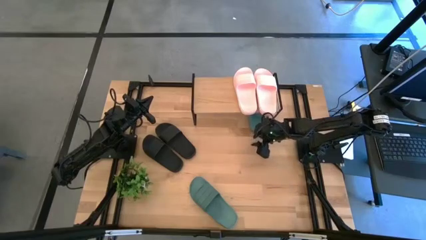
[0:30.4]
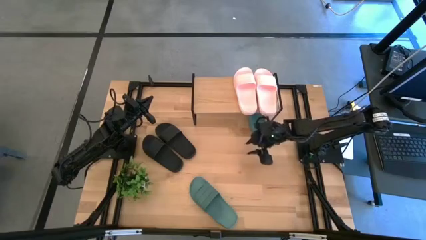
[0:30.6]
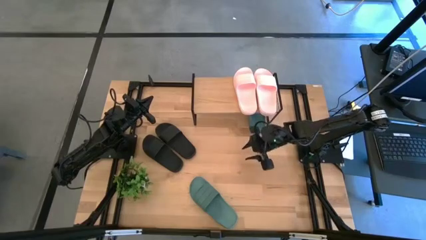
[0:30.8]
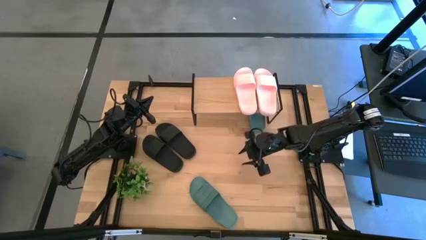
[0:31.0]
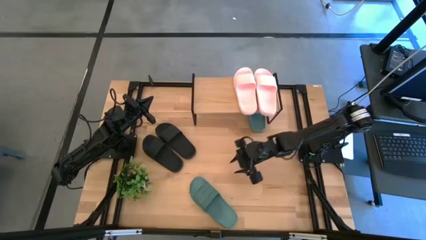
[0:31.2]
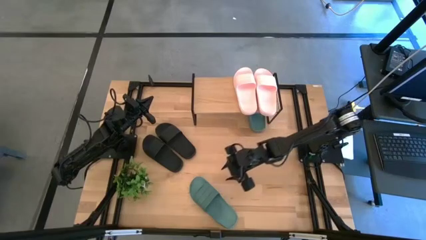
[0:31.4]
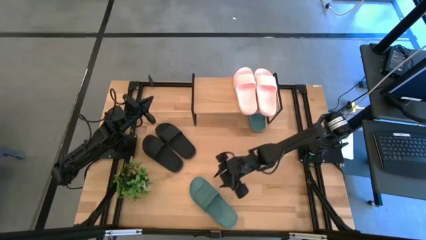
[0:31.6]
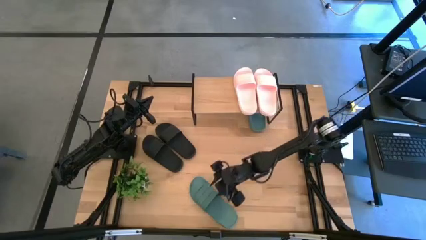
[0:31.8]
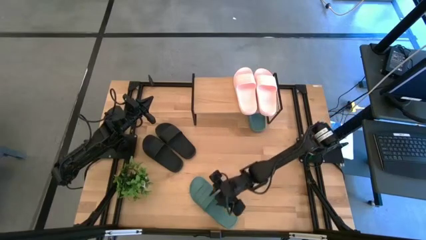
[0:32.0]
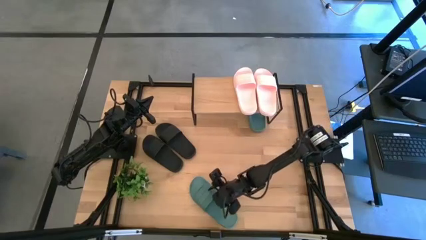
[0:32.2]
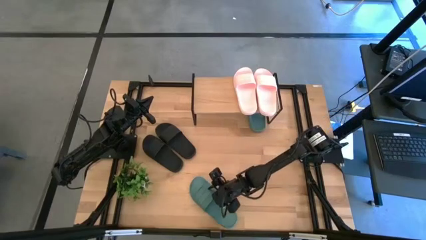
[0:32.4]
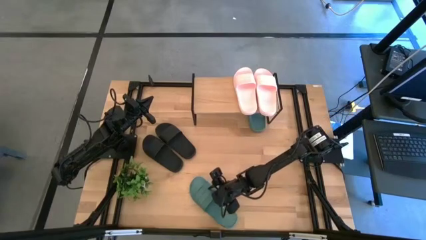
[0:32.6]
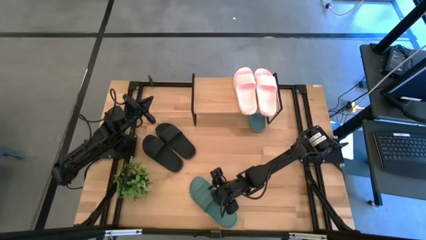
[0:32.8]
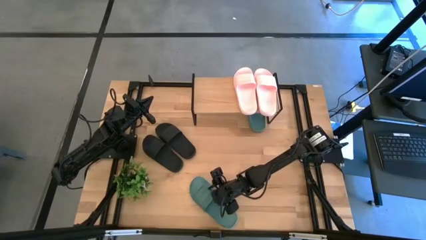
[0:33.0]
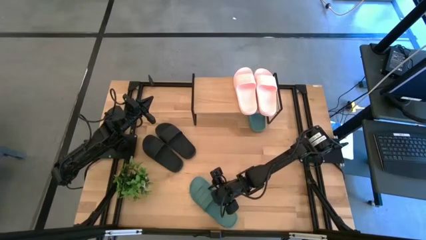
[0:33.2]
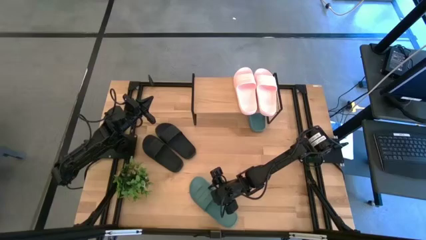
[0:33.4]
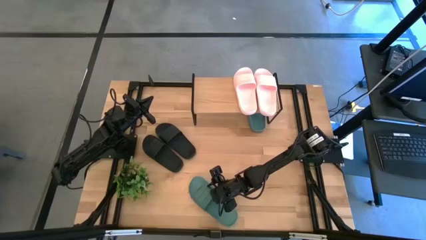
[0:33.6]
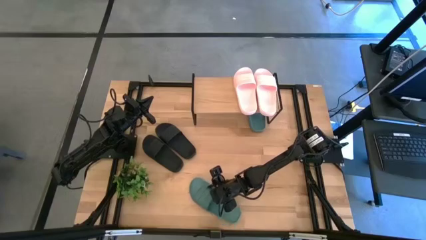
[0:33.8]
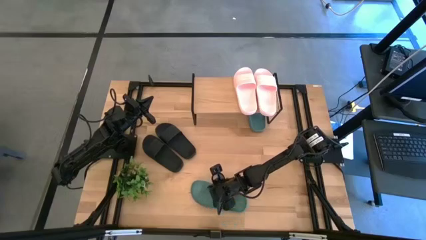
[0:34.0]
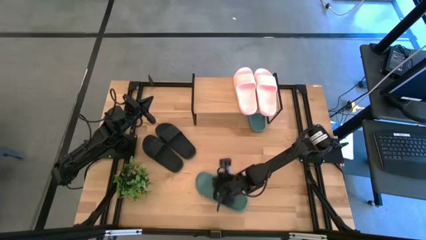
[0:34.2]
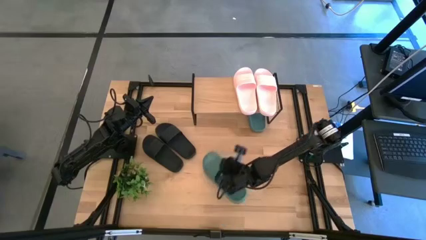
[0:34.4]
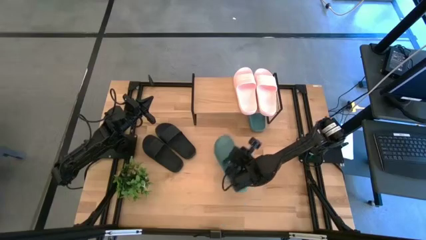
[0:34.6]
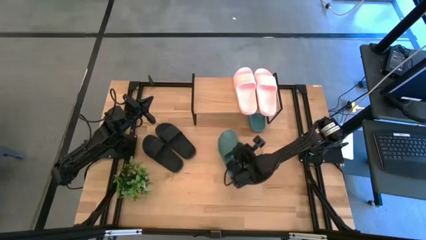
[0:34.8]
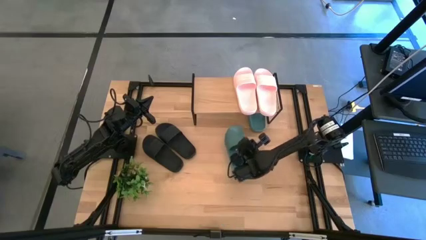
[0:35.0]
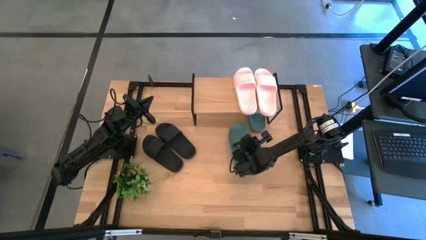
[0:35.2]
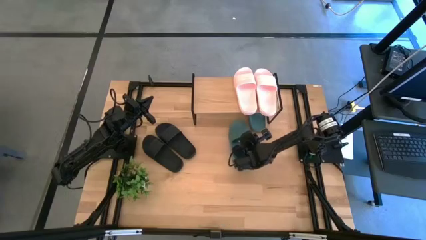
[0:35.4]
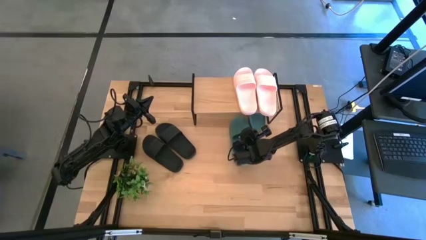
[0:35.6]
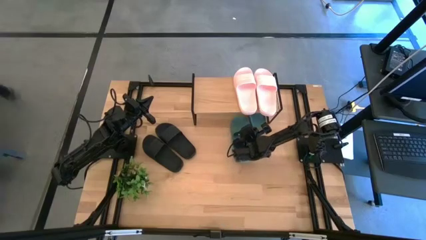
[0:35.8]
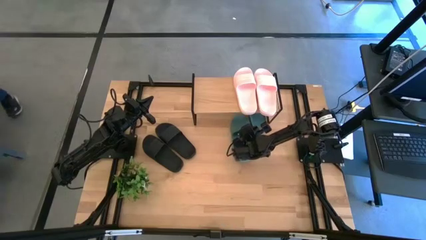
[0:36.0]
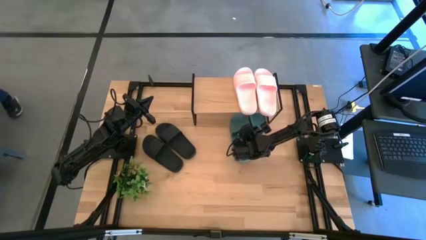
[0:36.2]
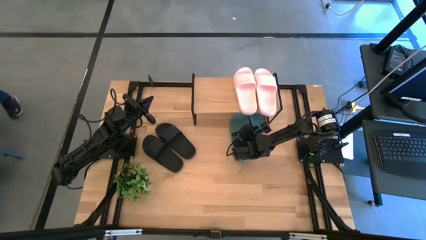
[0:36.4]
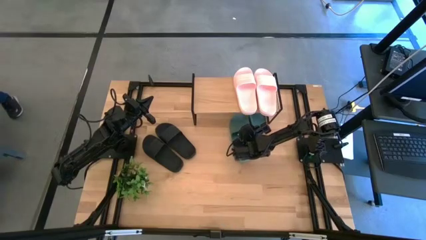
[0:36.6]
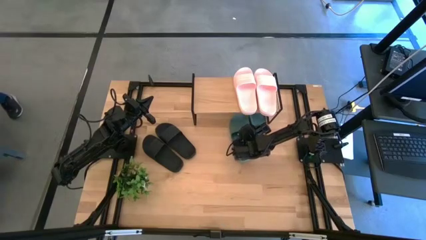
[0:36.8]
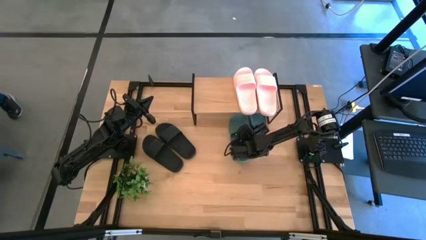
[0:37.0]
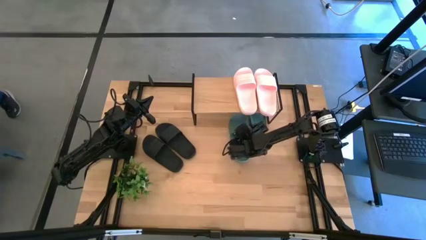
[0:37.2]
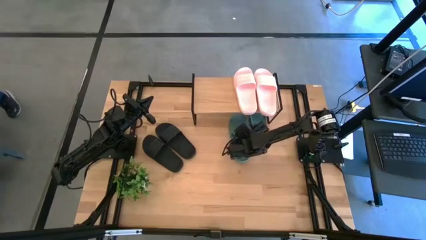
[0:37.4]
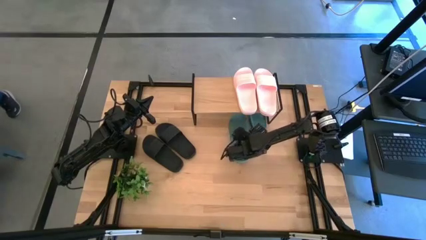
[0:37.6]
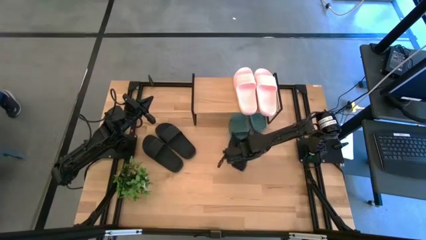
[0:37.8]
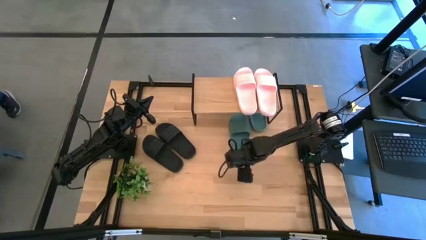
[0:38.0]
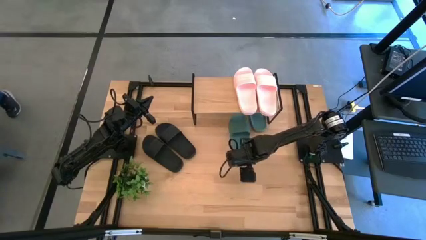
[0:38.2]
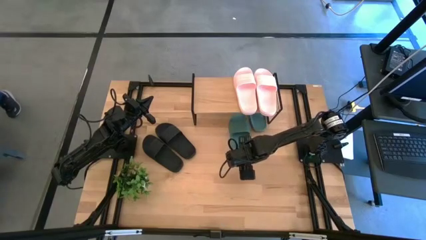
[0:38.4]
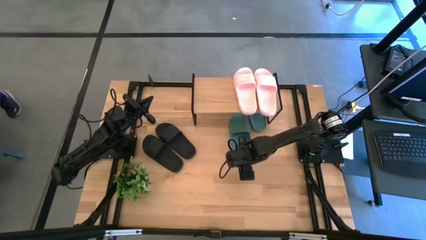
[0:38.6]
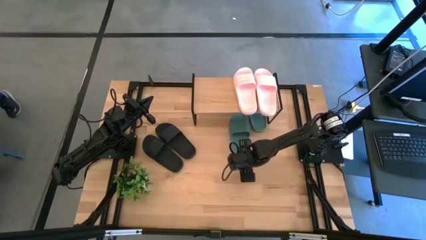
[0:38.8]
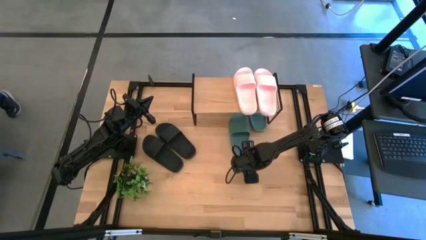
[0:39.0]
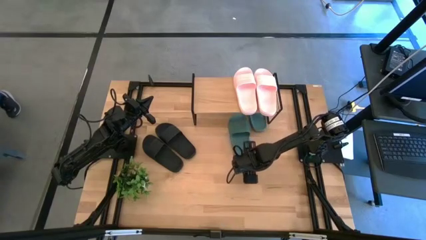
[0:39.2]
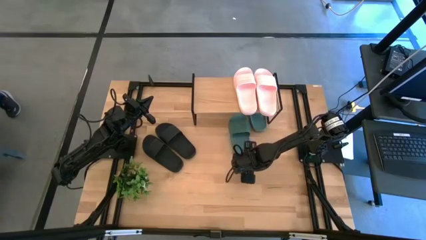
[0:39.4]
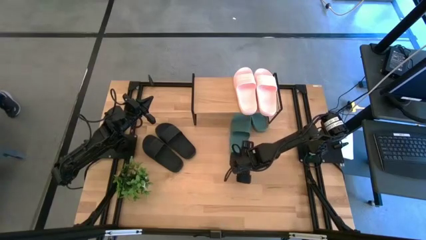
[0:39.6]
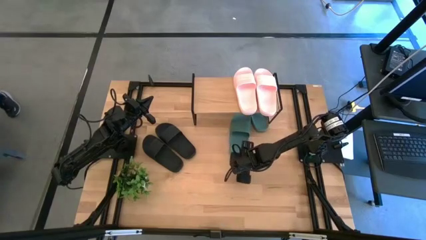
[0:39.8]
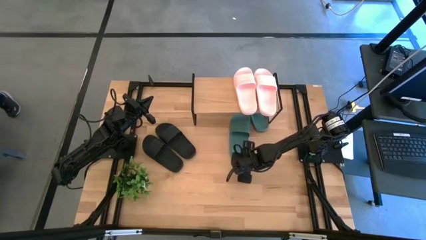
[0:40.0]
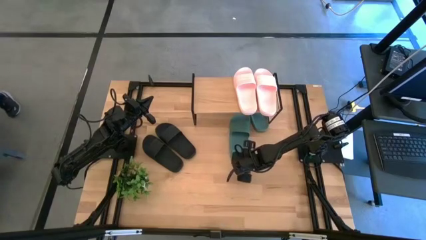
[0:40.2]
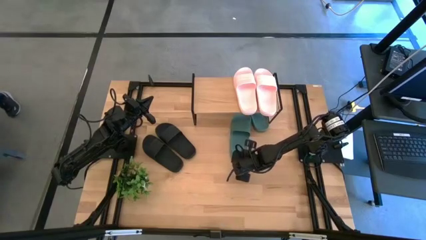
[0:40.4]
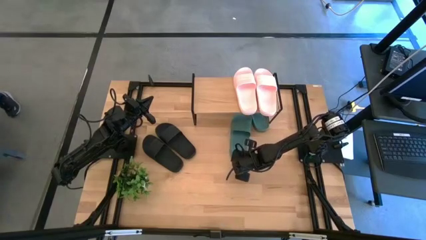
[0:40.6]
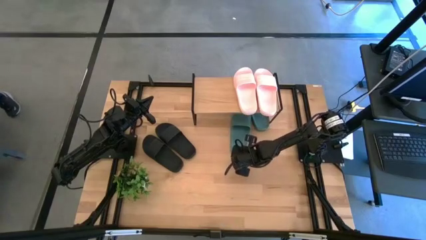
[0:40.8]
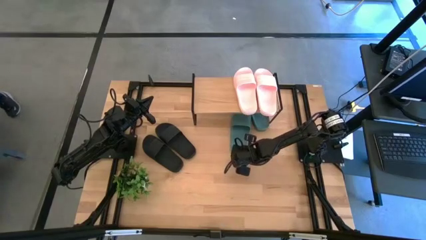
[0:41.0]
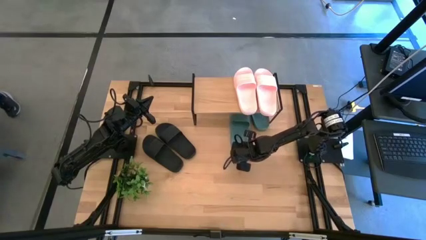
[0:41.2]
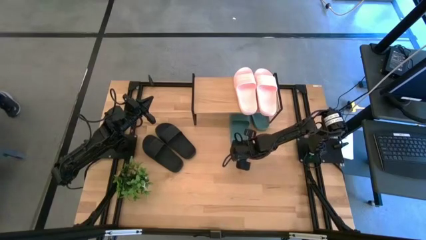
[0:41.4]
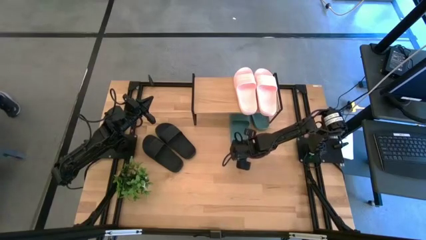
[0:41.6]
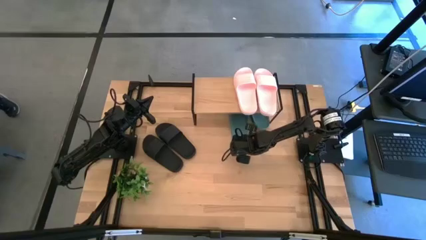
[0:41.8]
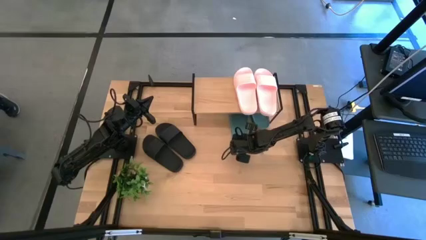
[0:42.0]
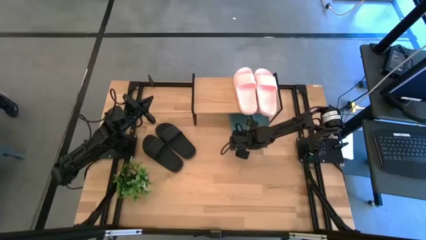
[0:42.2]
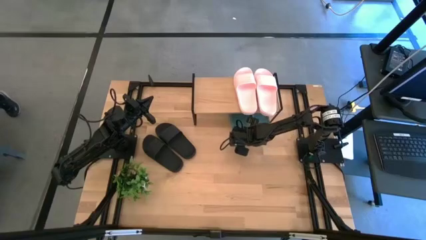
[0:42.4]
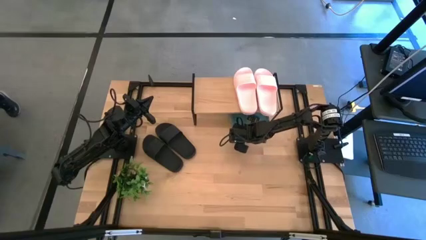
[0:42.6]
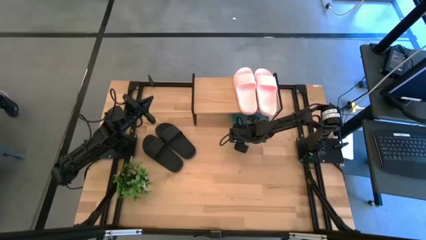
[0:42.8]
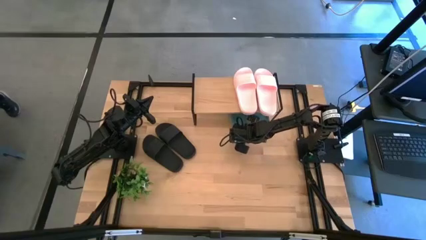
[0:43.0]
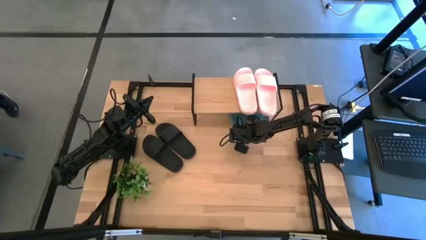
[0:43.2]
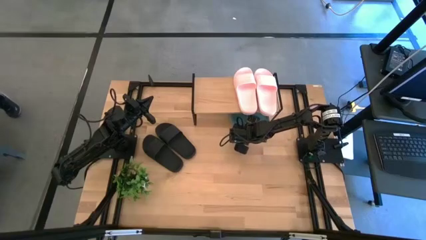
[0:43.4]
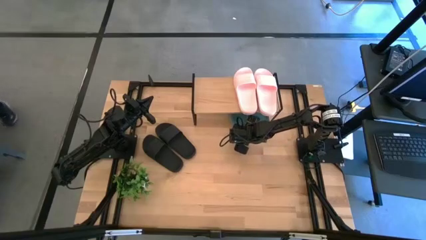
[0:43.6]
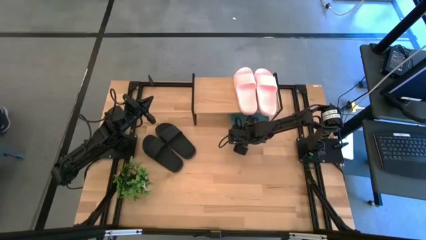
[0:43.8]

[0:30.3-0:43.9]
Task: Pick and place slides into the shelf
Put the green slide under the shelf

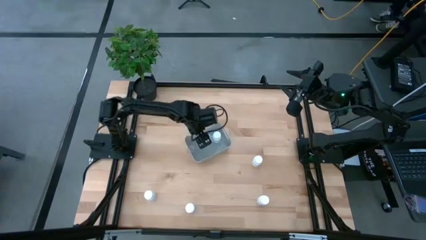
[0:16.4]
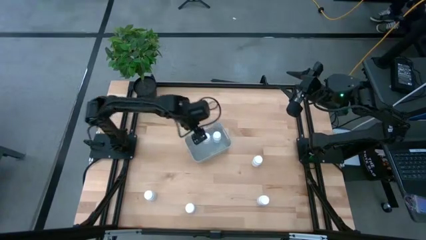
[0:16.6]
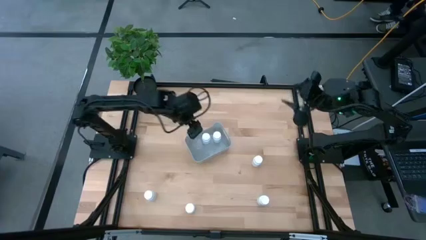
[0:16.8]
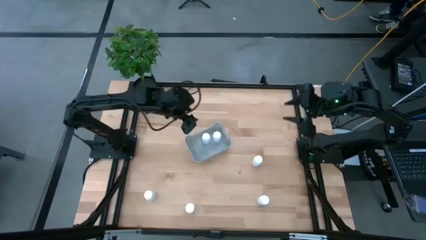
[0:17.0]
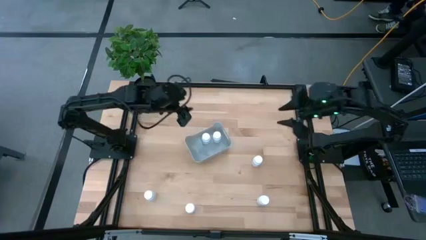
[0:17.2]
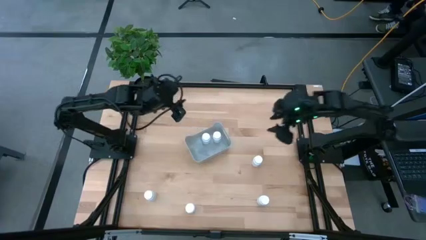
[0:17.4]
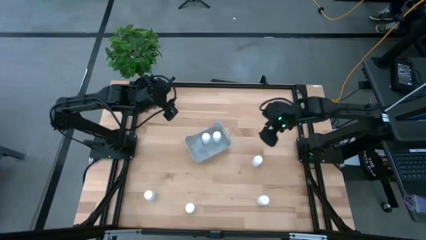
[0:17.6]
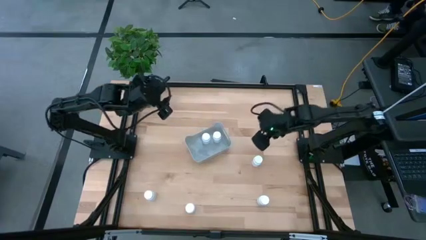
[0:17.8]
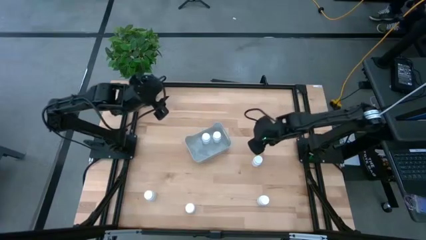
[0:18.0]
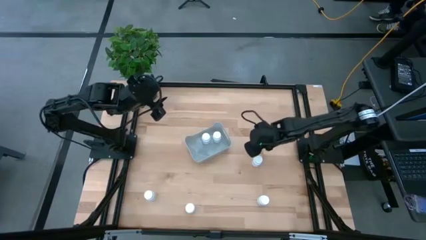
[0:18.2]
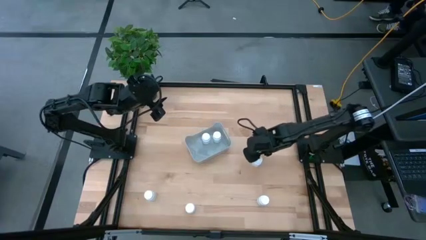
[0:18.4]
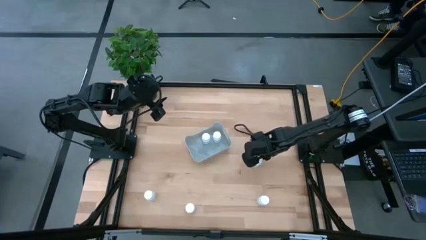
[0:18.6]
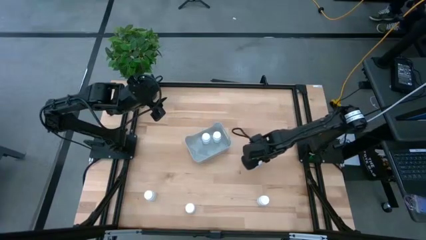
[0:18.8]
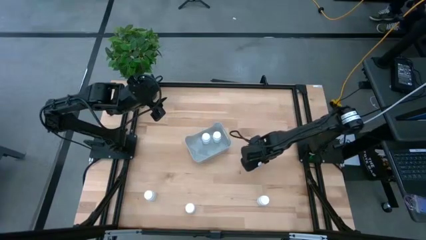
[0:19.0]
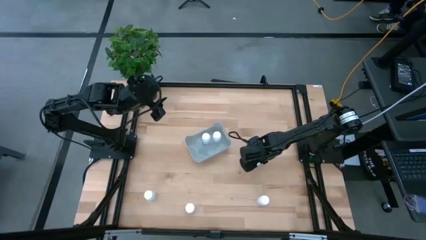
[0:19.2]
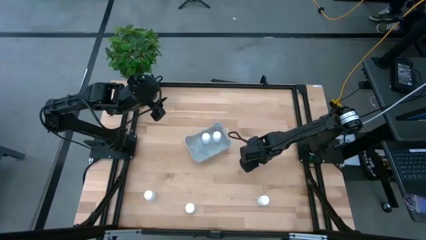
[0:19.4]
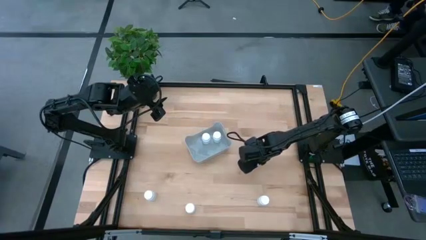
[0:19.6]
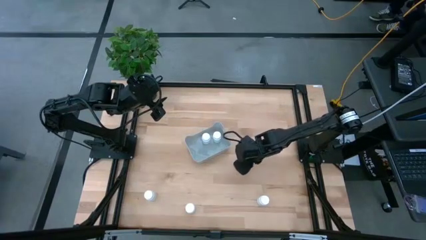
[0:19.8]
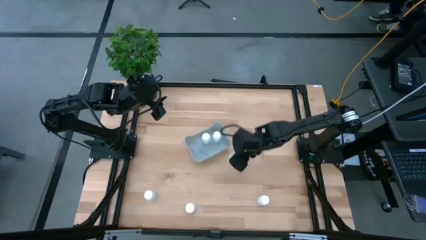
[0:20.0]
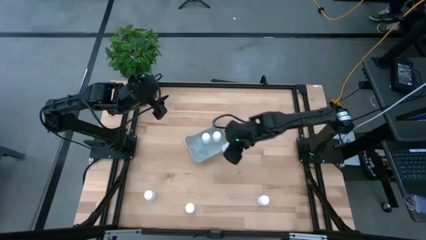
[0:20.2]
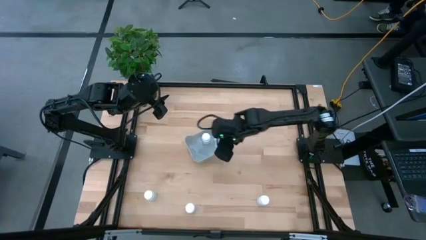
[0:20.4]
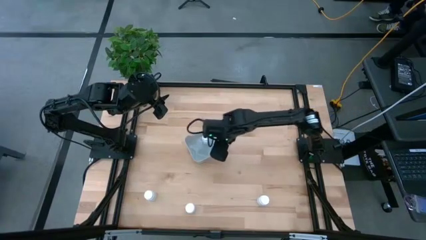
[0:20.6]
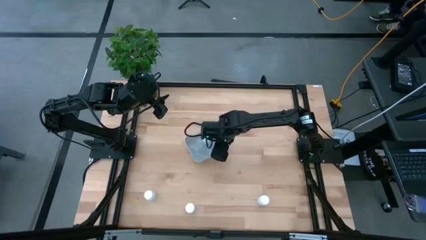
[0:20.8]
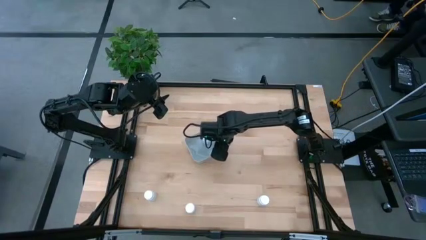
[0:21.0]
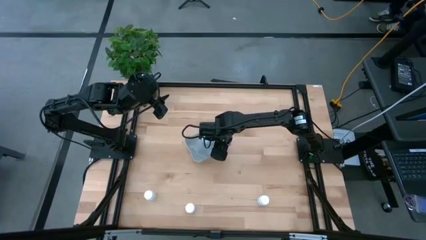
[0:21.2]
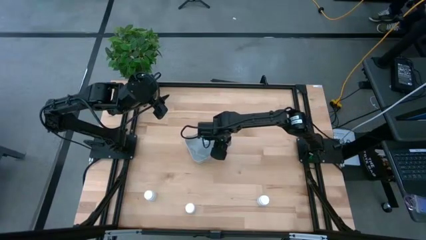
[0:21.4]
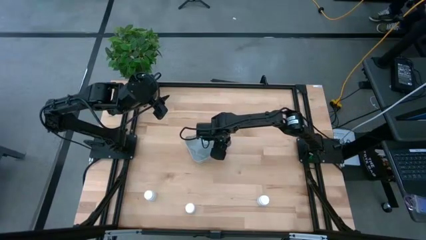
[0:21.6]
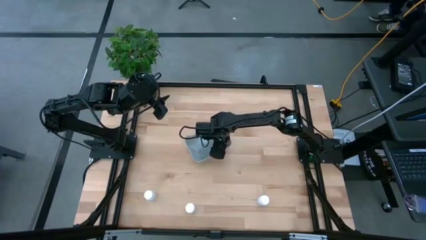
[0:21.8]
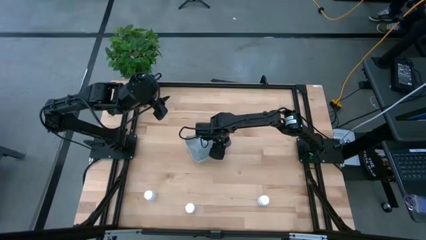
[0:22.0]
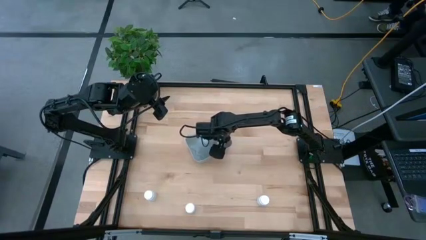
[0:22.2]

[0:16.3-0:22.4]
Task: Pick and place pill bottles into a basket
Put the white pill bottle into the white bin
